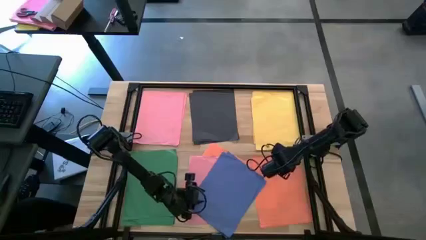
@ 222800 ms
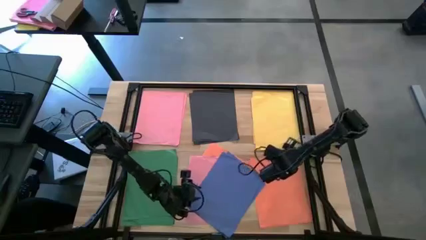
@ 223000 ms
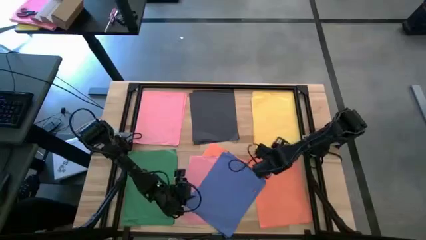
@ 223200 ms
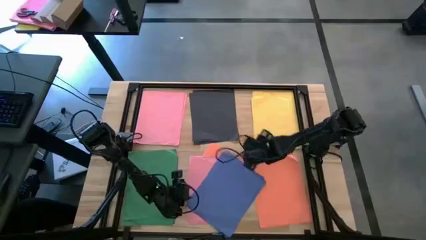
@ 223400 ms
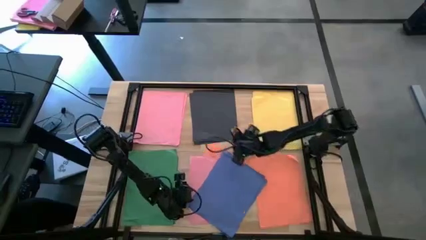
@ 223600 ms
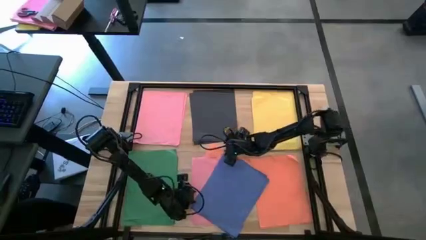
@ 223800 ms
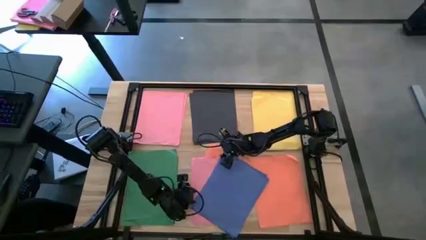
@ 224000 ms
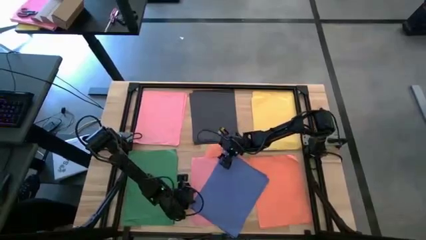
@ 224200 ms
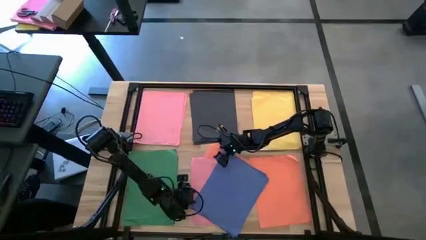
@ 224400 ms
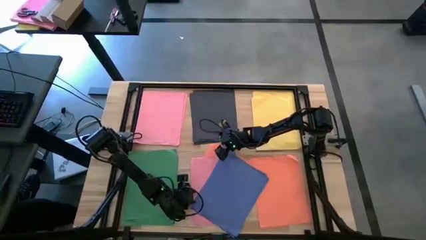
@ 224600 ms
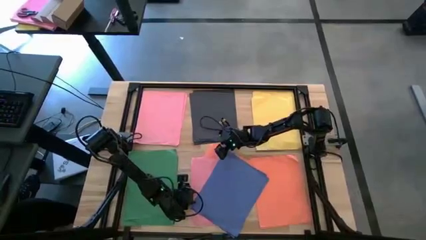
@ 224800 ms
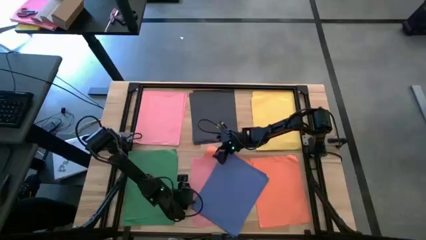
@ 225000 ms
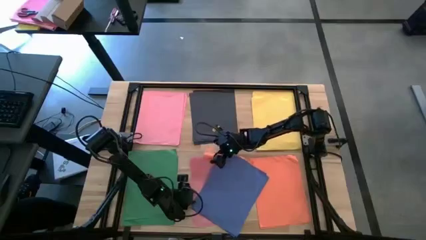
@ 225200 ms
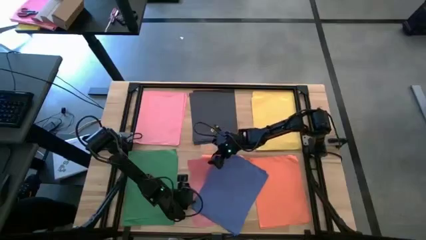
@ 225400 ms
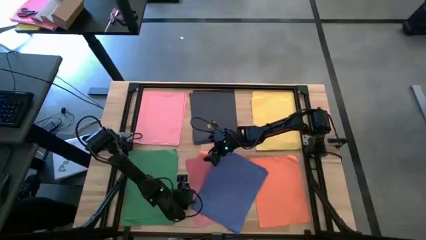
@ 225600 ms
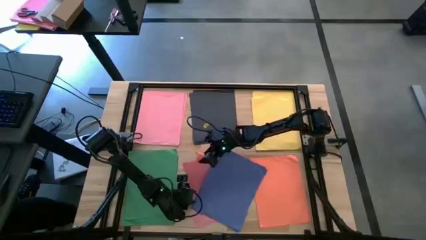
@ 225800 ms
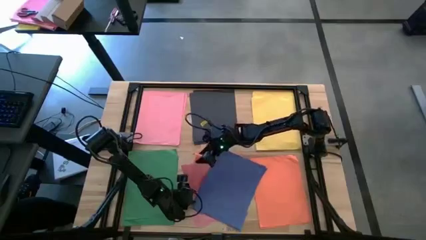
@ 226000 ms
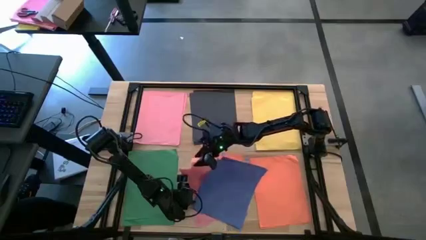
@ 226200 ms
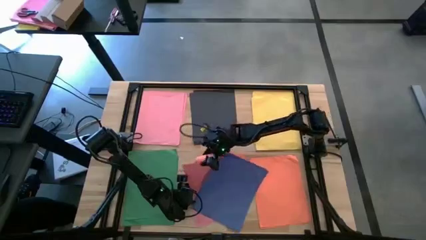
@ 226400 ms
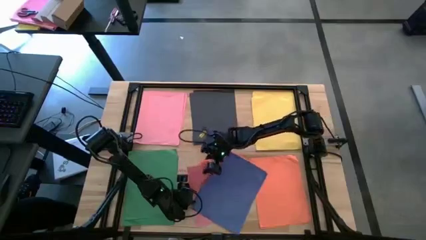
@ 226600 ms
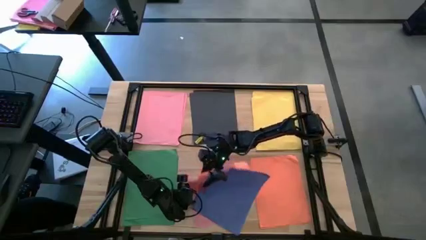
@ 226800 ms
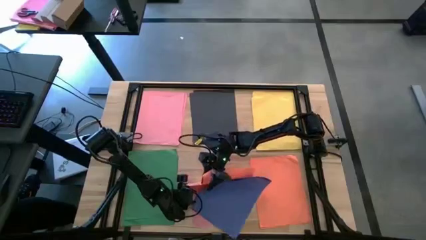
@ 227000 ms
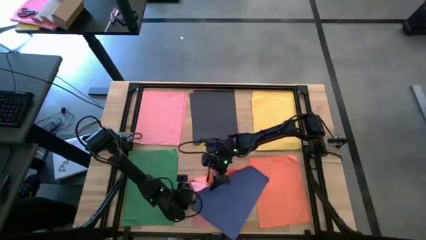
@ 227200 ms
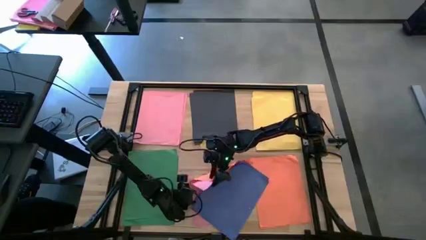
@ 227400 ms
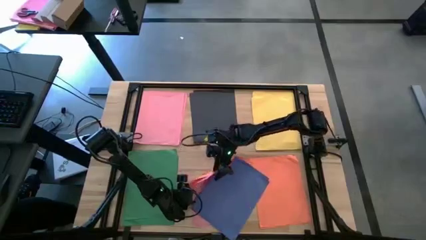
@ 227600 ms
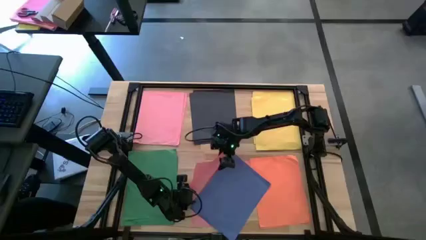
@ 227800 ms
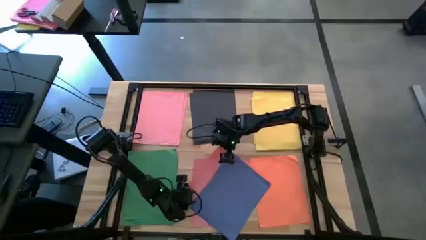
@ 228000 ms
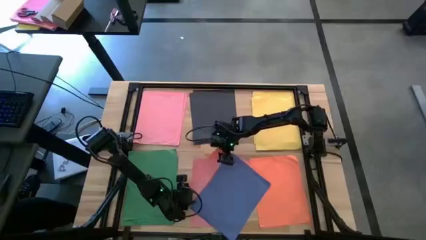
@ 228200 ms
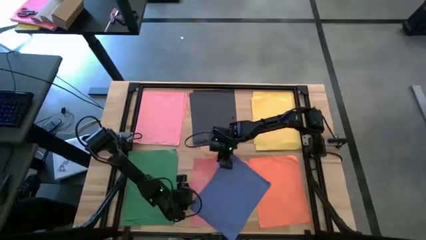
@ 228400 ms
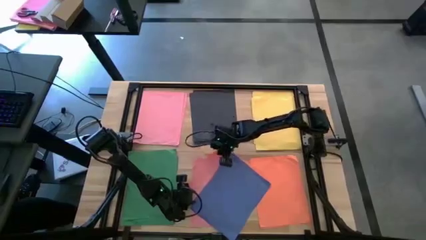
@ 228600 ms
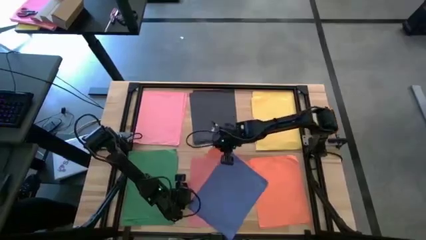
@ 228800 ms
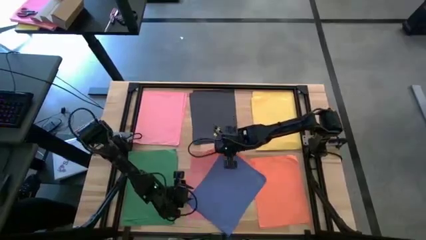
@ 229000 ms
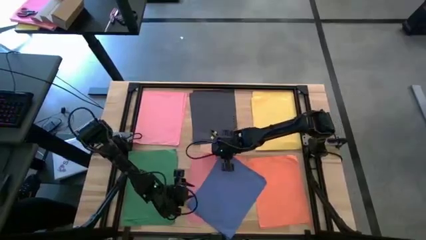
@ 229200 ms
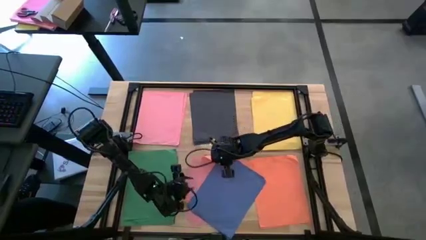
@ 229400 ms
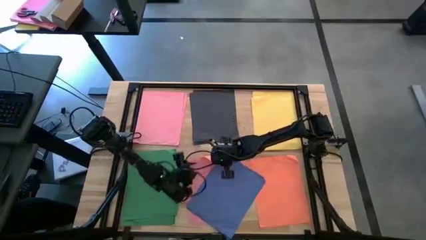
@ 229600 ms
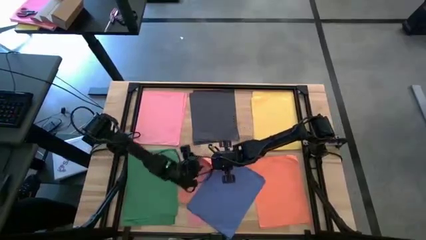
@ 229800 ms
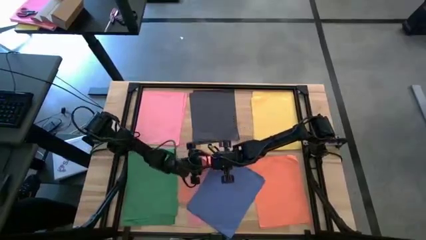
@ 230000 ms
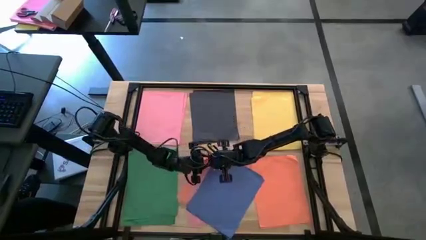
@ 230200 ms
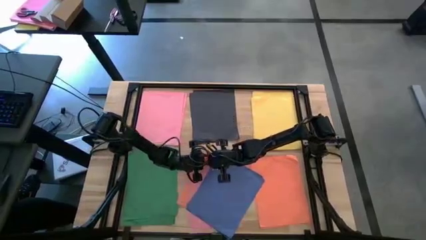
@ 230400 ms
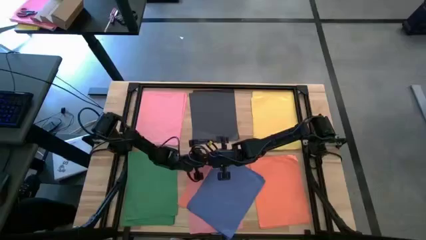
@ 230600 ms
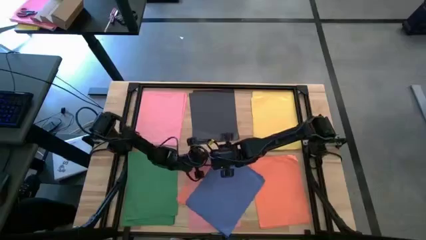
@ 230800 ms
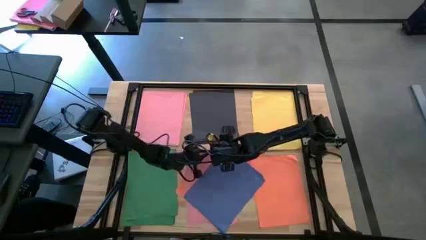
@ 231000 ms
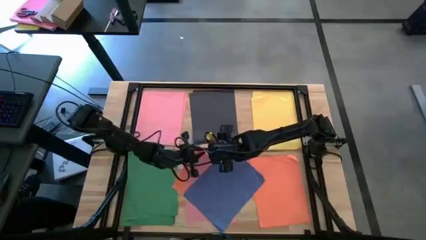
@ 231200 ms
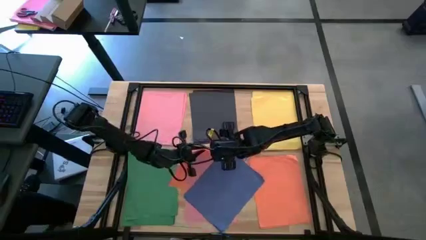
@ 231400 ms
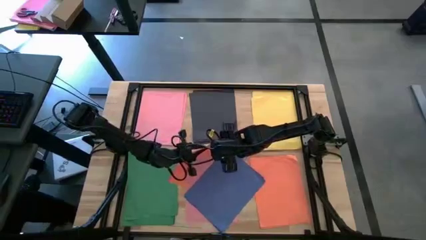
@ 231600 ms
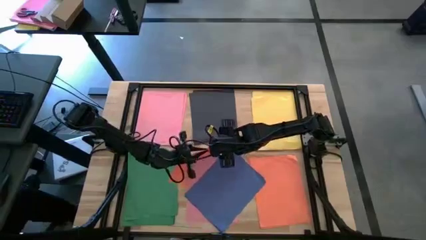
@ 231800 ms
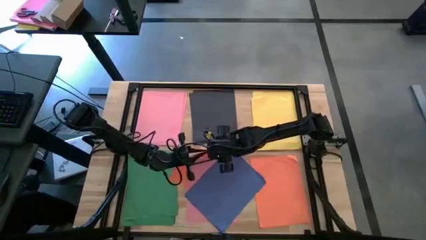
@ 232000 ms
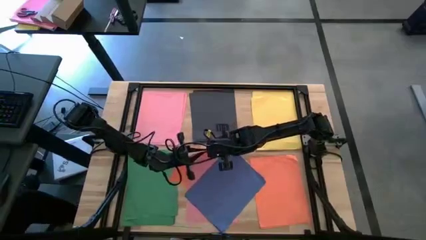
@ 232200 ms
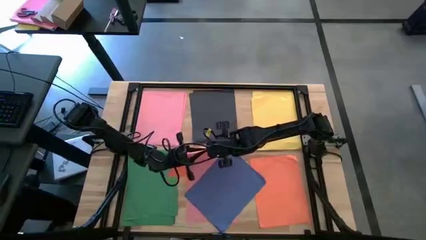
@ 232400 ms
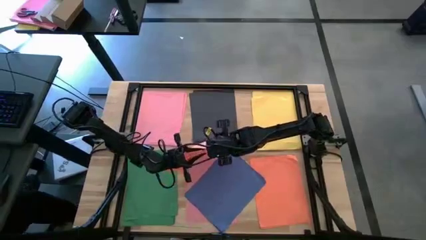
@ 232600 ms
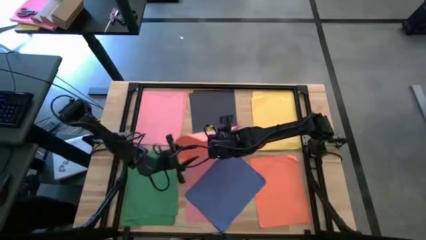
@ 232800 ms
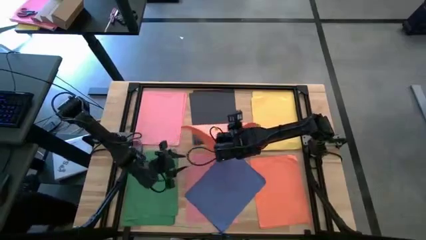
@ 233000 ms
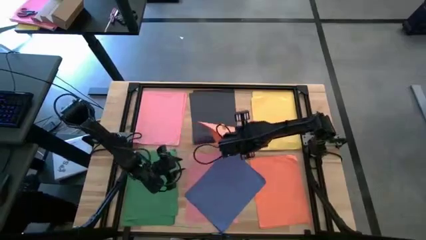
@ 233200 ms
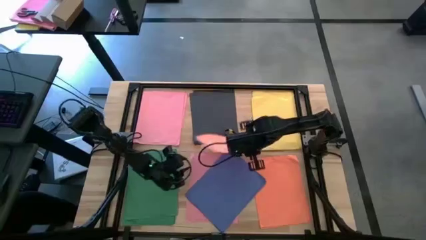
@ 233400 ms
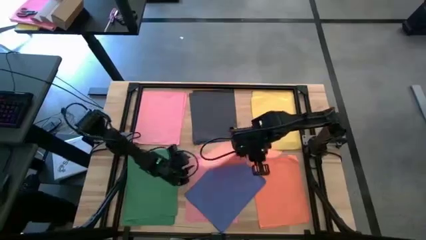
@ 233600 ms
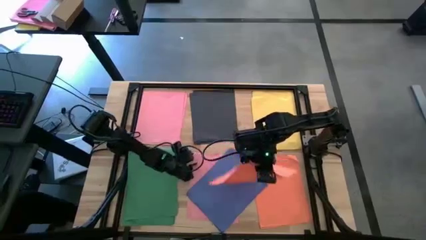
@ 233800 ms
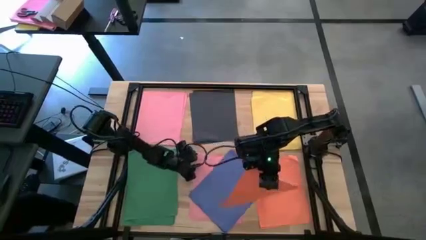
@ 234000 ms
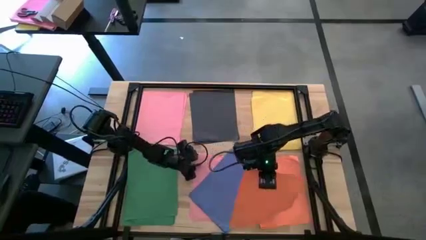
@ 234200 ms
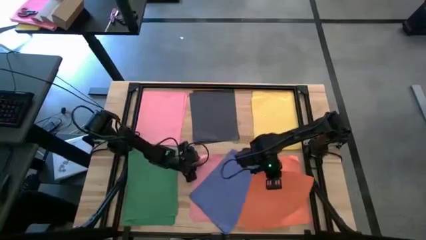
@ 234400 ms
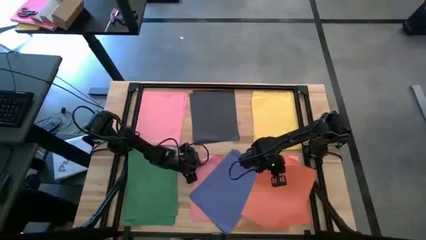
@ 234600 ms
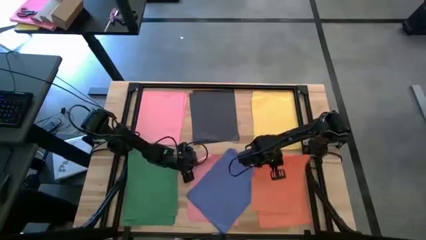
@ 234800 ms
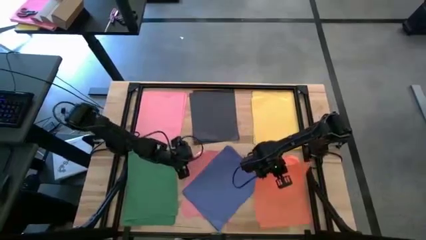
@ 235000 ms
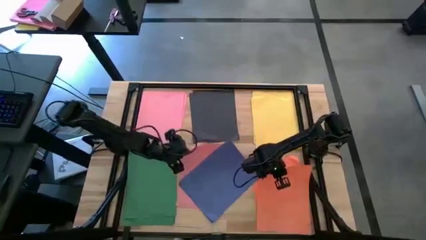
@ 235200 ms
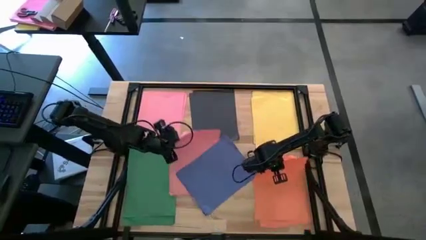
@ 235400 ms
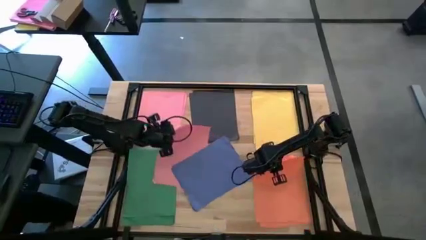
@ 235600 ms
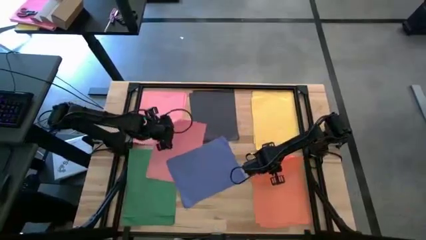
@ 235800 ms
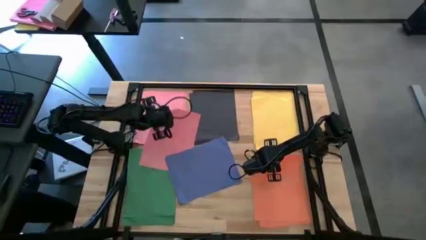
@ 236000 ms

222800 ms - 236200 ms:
Task: Organize paper
Stack the orange color paper on top of the other orange color paper

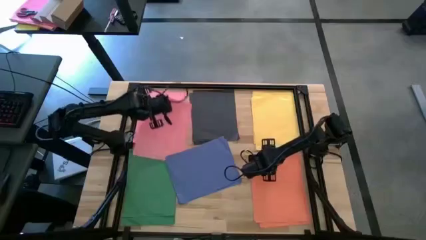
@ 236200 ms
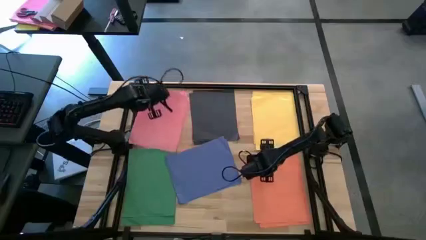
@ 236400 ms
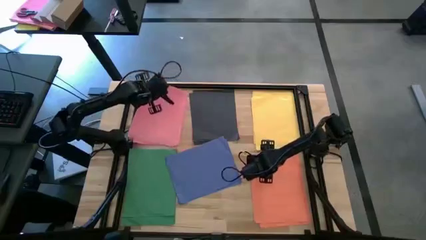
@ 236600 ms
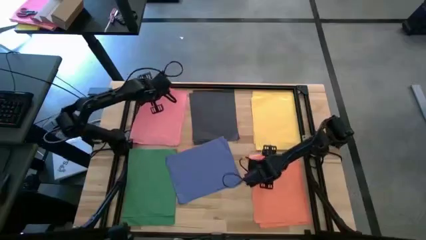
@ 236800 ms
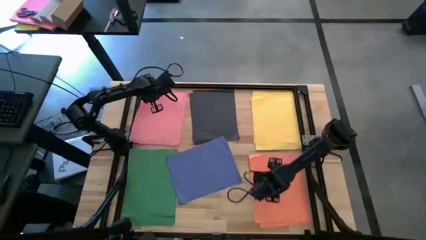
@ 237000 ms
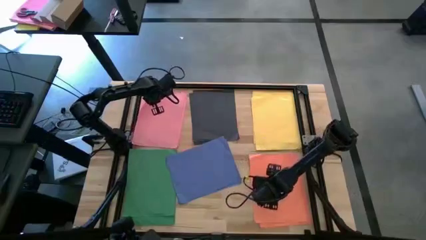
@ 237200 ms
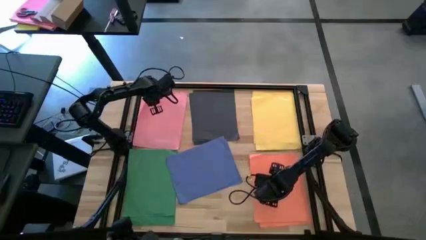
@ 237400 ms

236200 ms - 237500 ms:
Put the pink color paper on top of the other pink color paper
